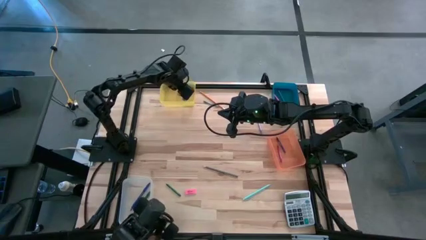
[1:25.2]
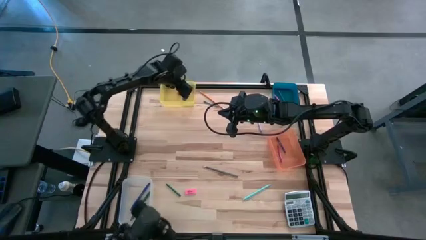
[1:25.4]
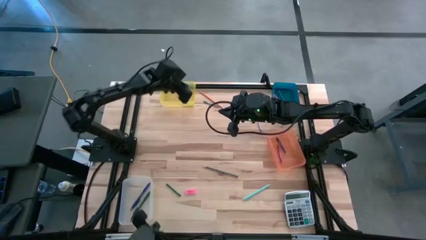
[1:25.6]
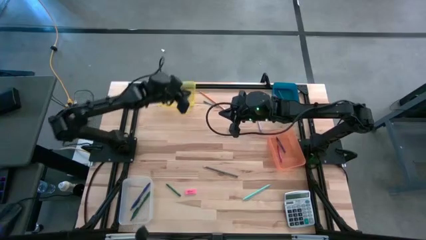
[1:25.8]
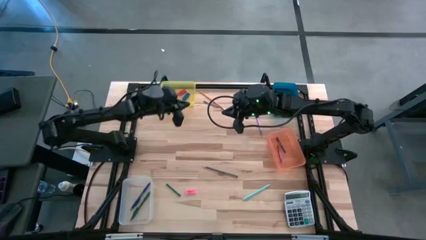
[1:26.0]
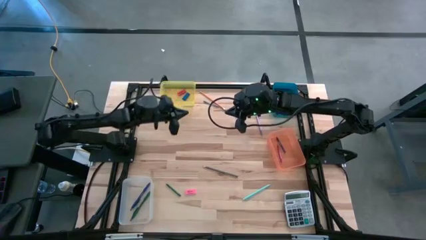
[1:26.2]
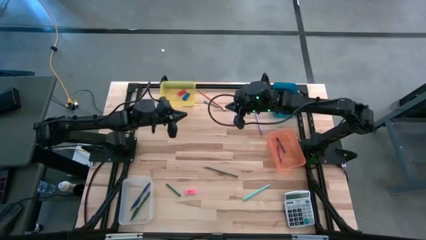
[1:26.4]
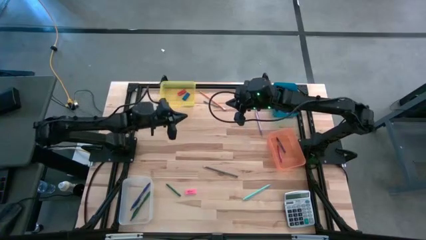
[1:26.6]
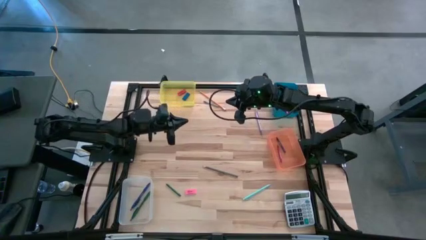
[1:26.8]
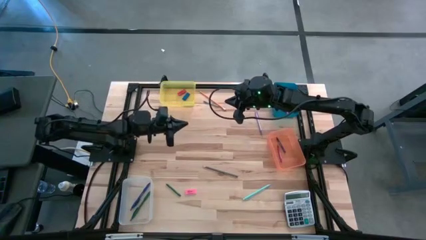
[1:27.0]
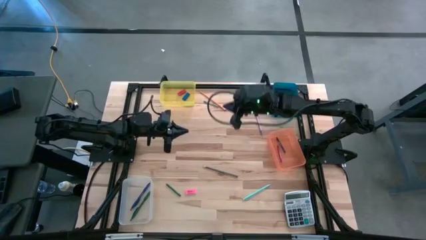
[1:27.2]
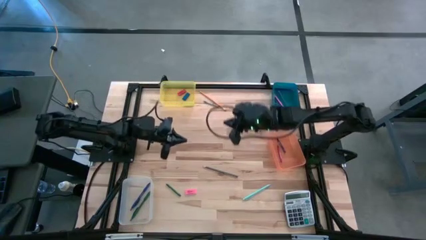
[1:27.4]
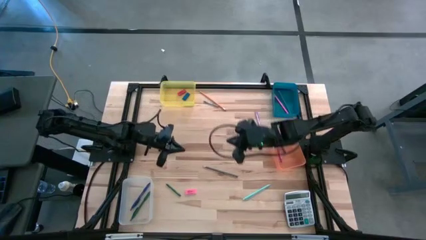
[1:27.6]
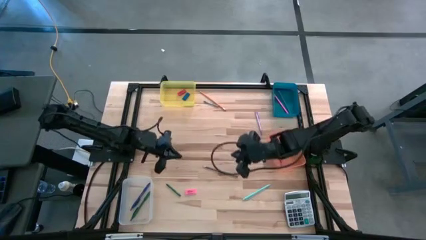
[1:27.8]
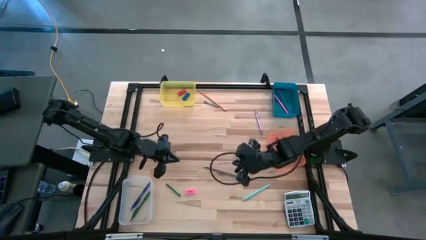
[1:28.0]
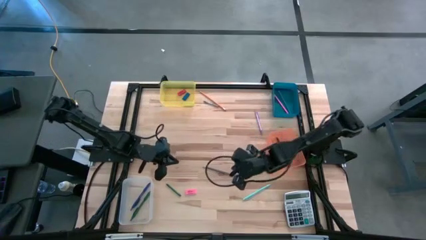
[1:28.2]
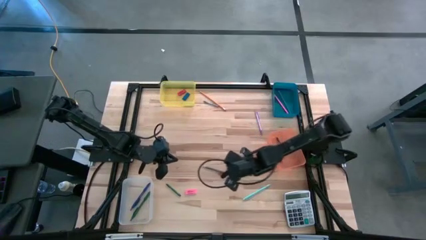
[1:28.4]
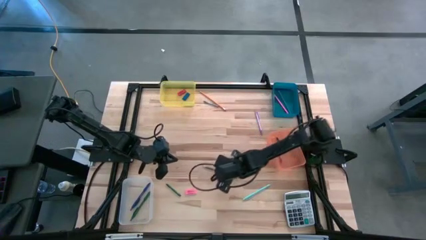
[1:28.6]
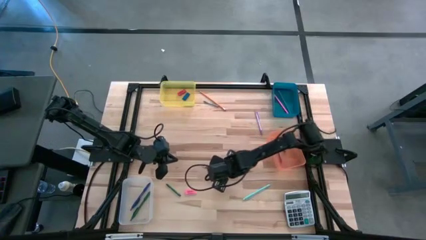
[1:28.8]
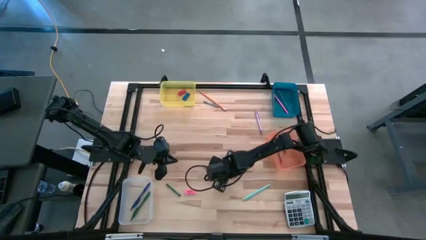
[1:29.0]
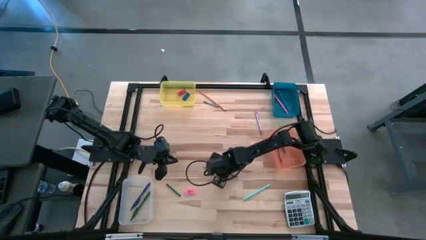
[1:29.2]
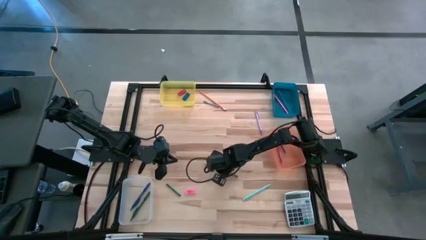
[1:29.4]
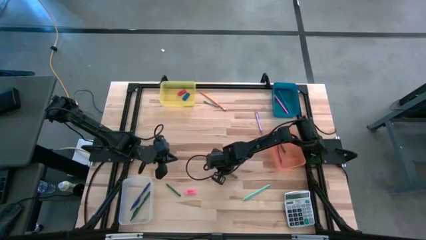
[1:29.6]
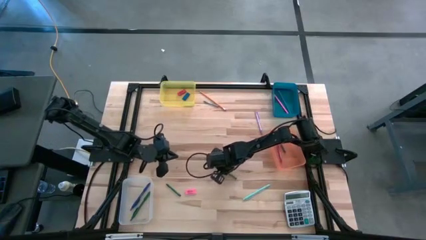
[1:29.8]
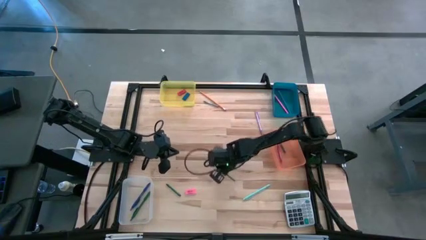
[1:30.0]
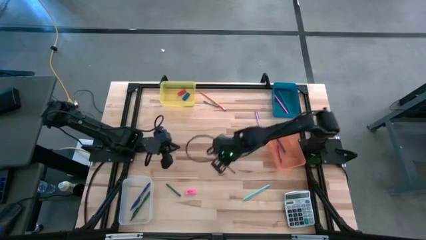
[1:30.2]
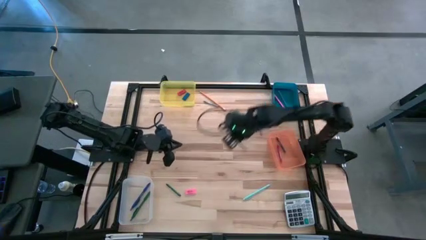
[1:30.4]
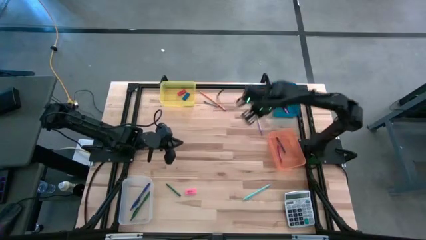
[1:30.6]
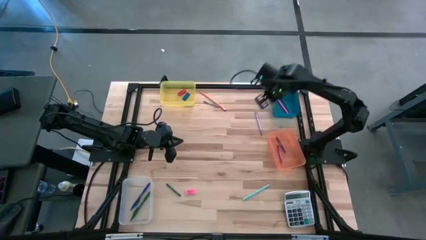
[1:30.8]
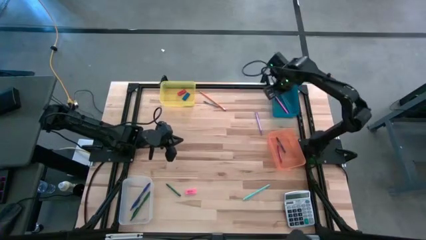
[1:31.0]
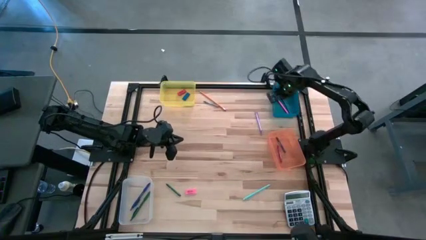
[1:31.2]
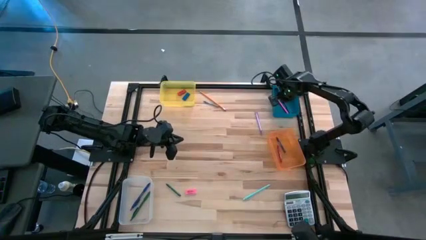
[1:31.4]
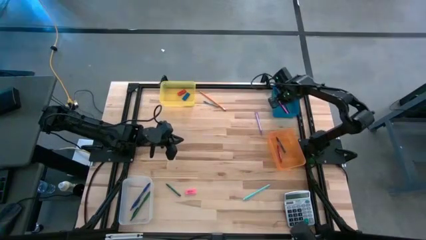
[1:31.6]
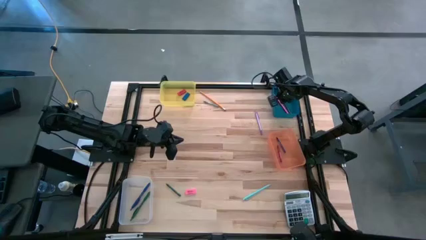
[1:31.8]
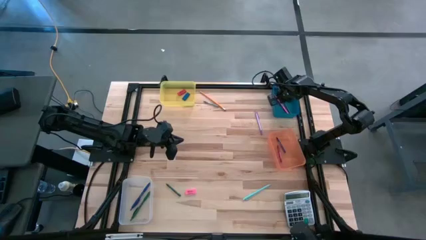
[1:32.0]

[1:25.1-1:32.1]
Task: Sort crayons/erasers/pens/pencils in bins
Put the black pencil into the blue bin

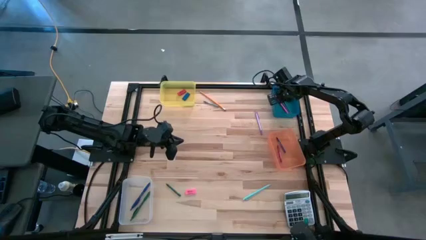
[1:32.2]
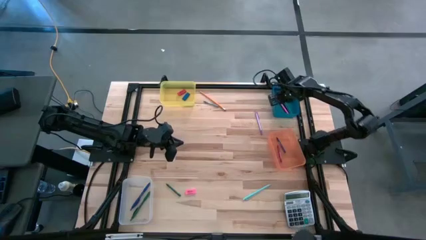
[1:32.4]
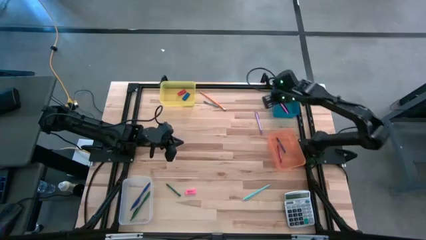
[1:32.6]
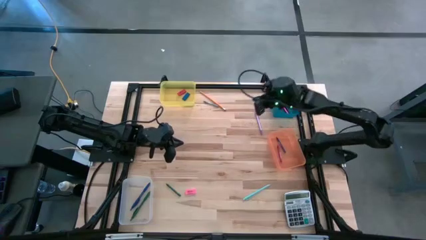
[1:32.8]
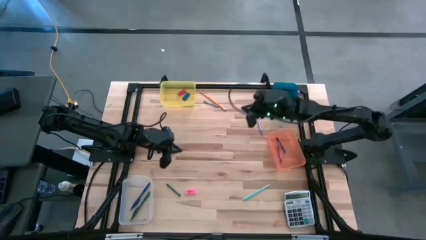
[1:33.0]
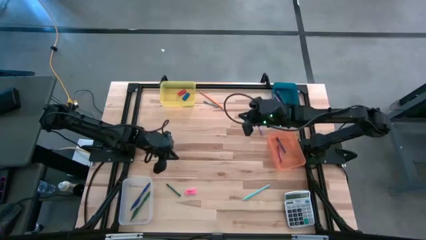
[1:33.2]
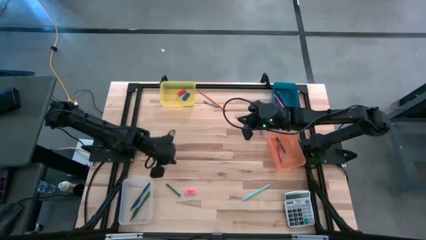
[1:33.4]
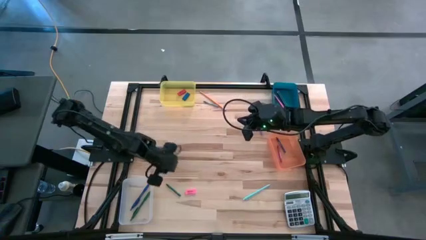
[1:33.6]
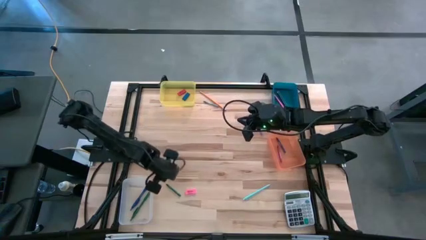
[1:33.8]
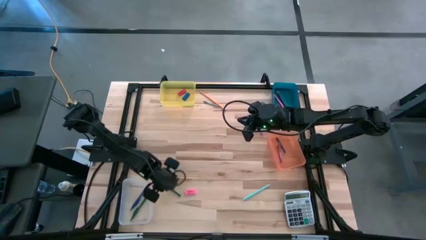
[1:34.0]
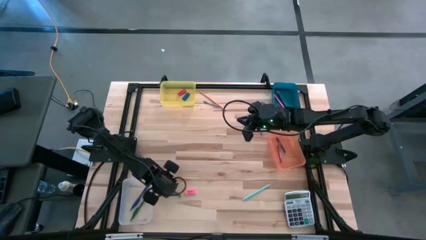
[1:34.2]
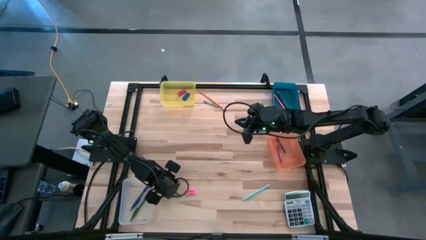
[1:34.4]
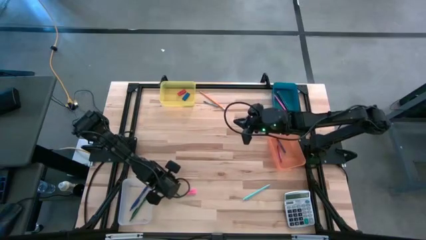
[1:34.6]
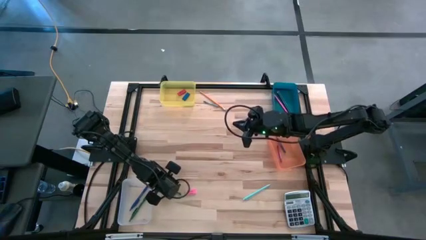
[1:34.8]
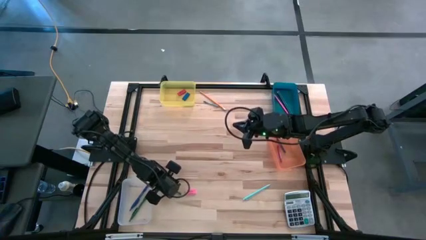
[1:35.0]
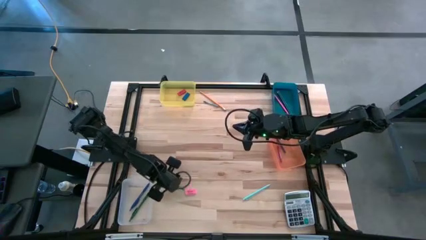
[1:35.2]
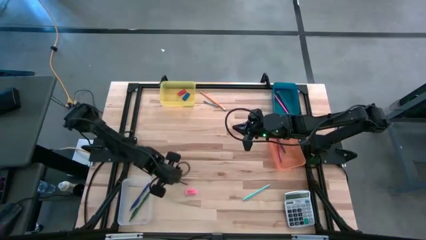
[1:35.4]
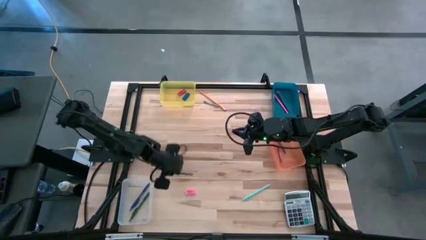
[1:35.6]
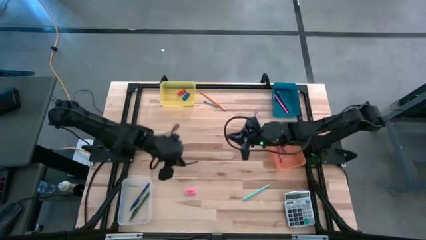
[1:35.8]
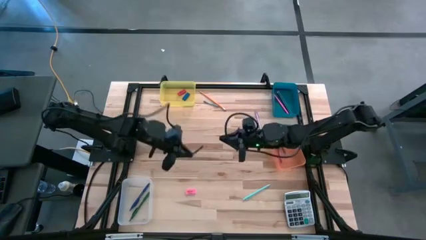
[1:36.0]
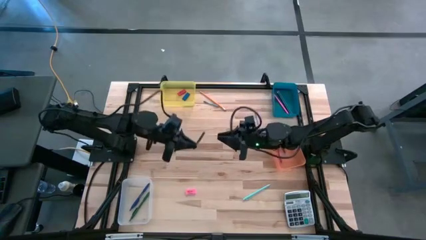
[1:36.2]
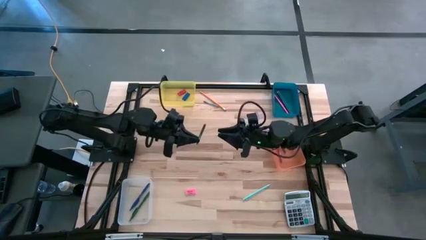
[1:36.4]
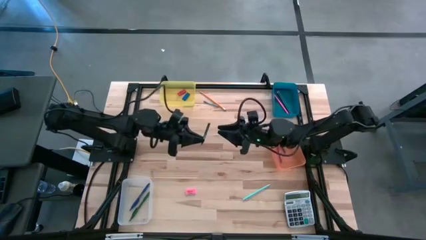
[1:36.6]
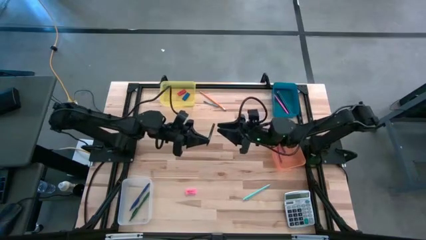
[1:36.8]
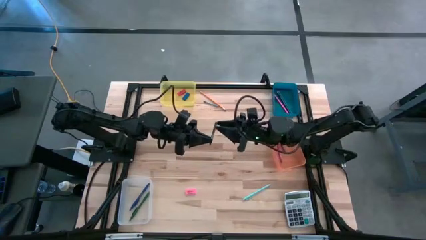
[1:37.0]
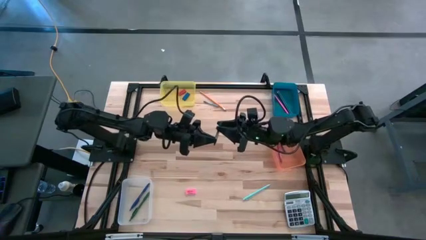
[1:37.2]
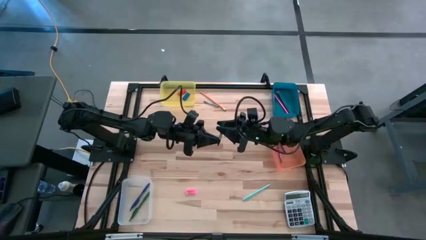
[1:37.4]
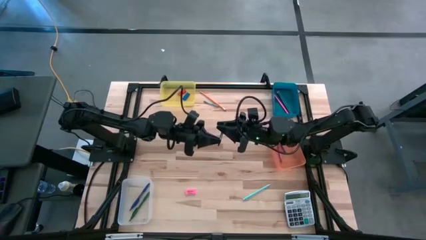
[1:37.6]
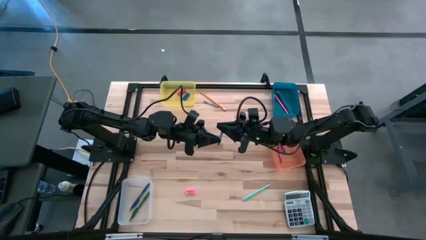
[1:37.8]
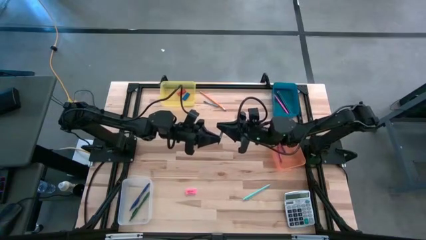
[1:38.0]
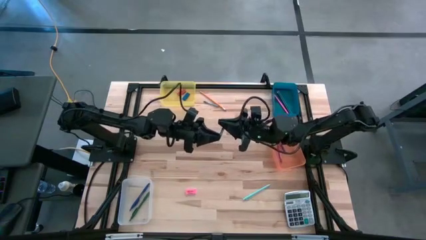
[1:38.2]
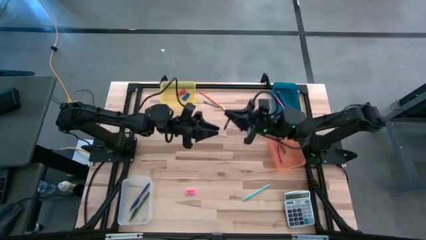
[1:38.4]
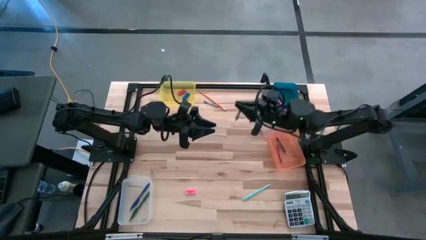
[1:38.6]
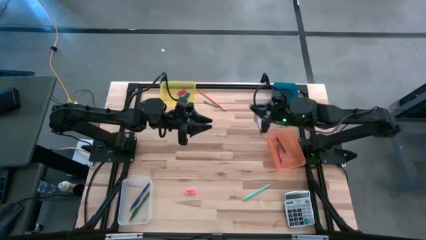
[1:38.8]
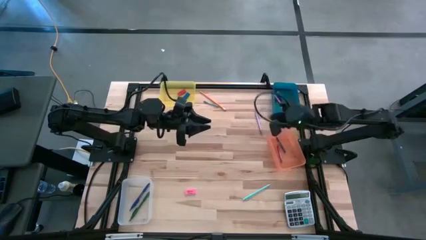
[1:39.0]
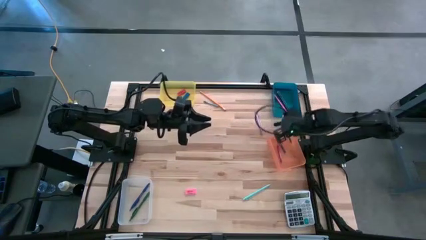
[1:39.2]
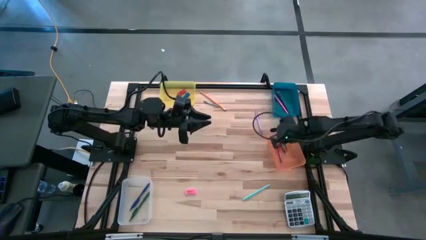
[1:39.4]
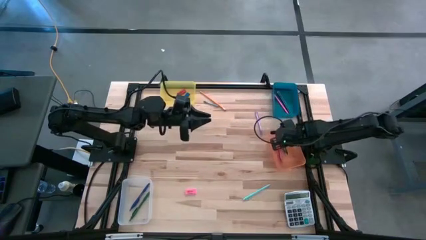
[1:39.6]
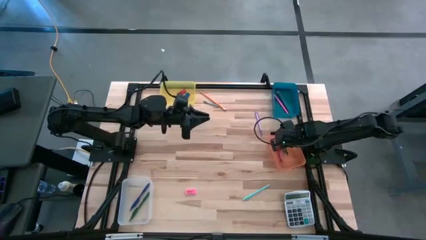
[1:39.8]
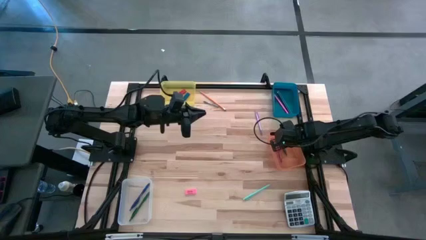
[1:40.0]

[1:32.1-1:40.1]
Put the green crayon into the orange bin

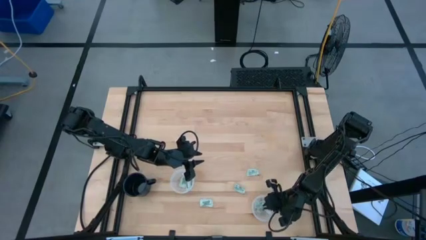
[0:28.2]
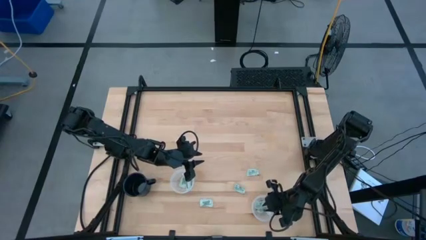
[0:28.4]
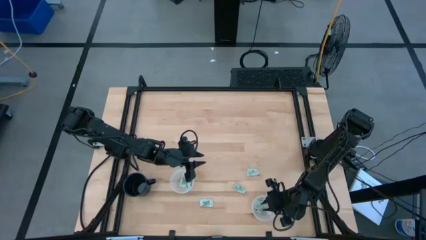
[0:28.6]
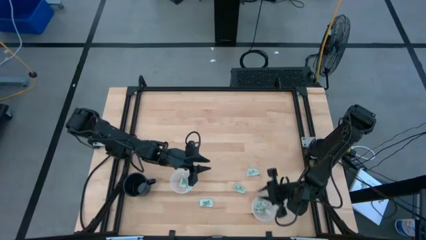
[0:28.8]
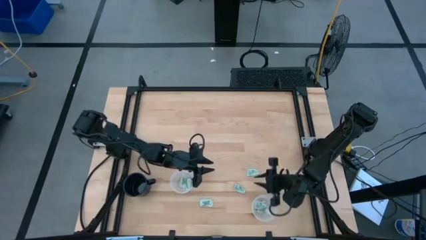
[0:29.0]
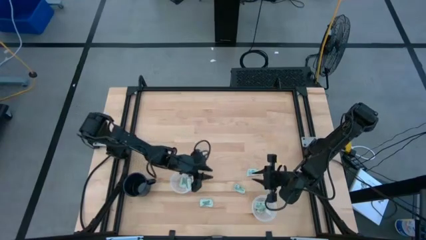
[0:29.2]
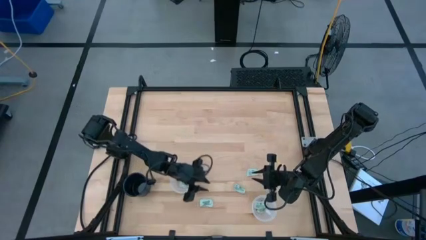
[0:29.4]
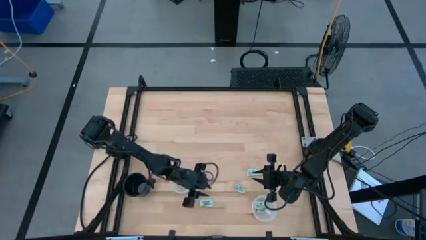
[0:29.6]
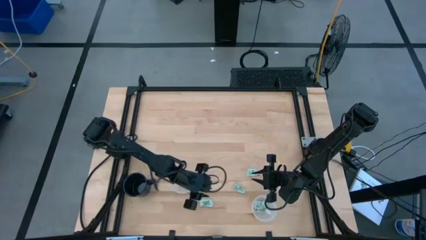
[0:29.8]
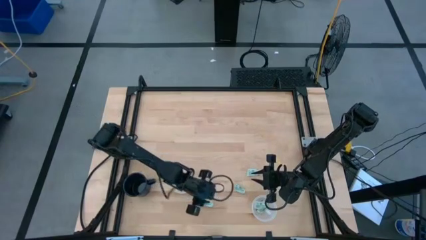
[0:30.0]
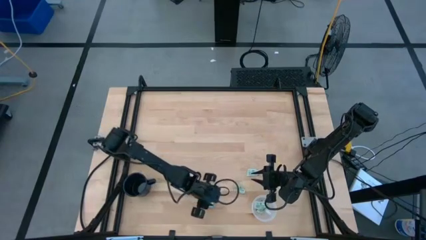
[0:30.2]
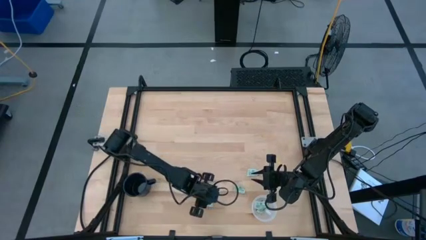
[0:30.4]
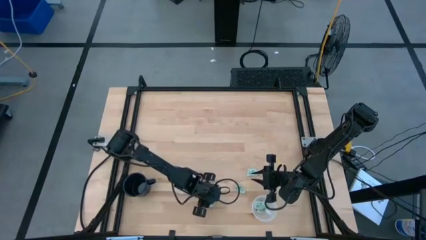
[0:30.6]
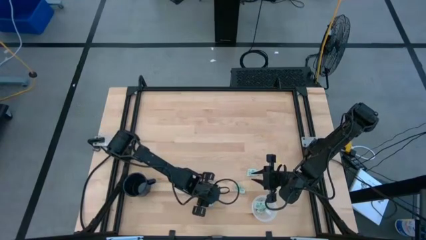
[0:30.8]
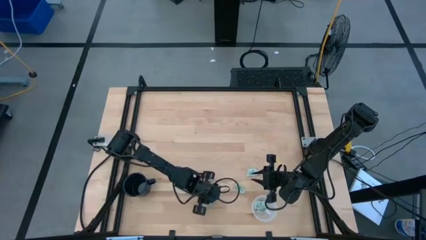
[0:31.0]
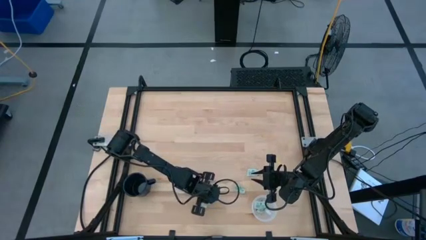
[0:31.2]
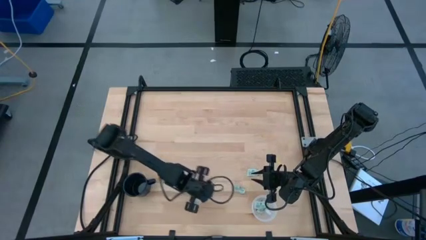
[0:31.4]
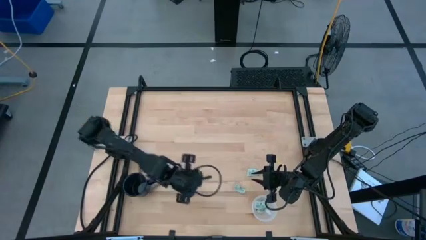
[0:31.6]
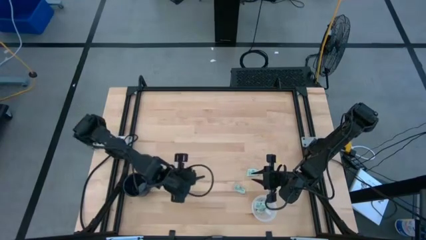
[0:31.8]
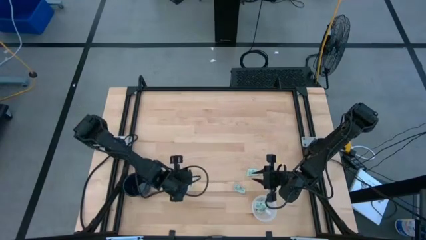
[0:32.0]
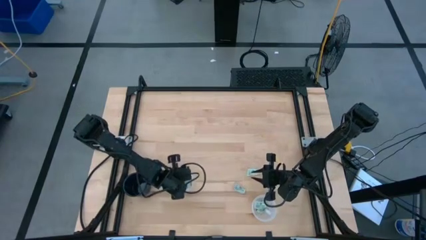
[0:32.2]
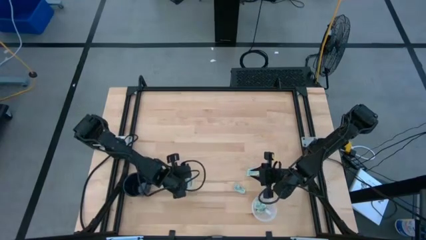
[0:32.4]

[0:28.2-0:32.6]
Task: Pick and place items into bin
Put the stevia packet into the top transparent bin
